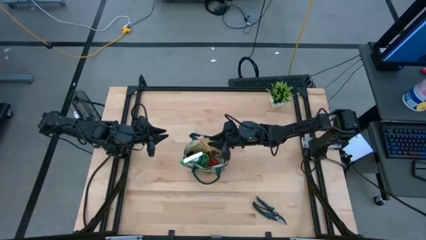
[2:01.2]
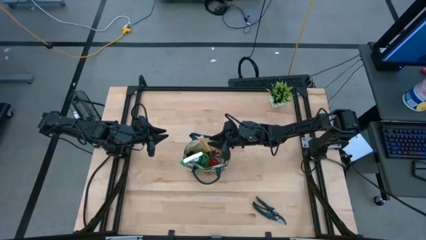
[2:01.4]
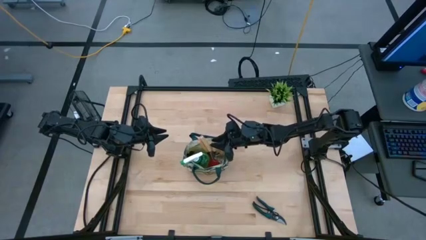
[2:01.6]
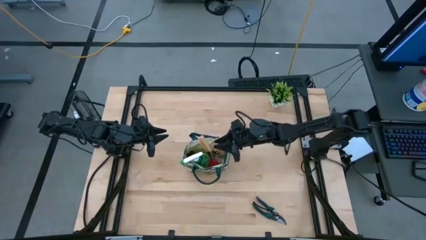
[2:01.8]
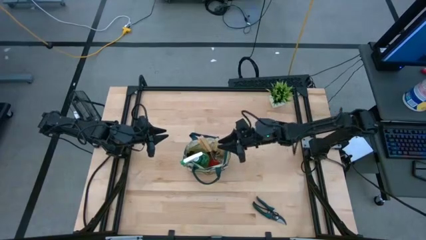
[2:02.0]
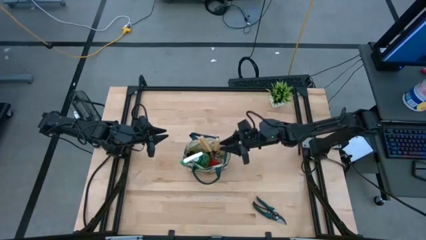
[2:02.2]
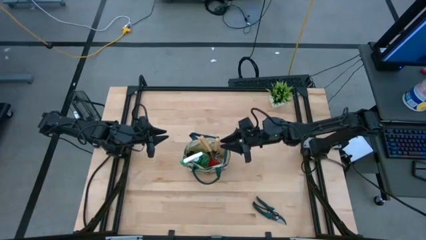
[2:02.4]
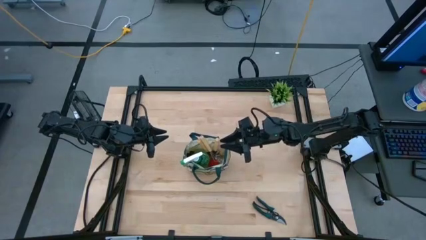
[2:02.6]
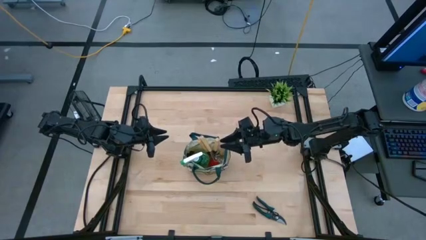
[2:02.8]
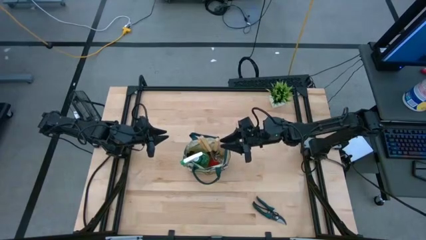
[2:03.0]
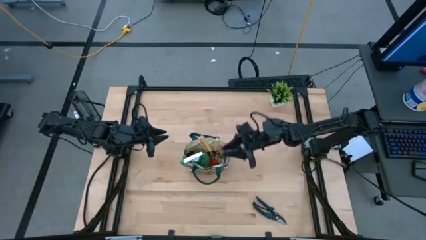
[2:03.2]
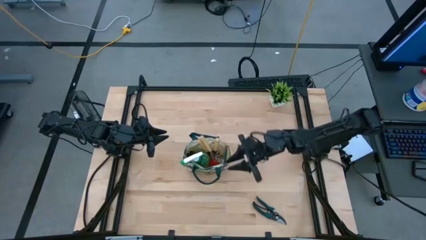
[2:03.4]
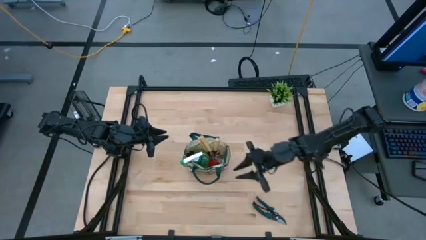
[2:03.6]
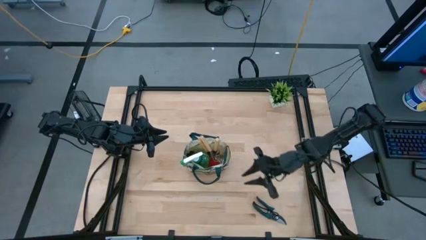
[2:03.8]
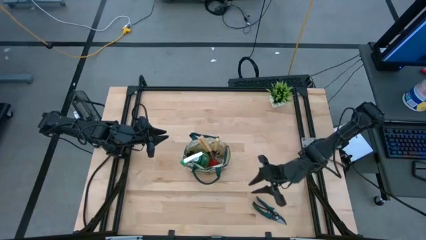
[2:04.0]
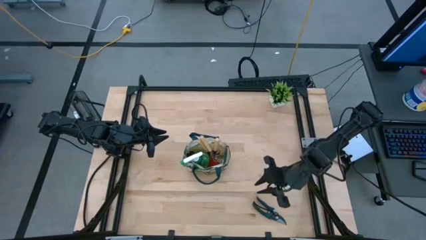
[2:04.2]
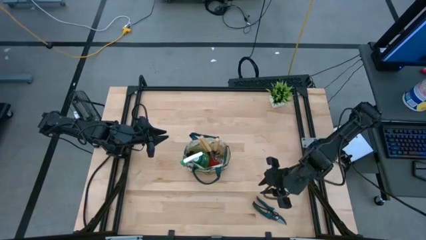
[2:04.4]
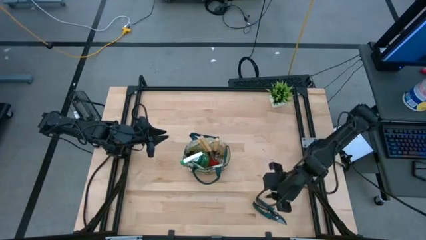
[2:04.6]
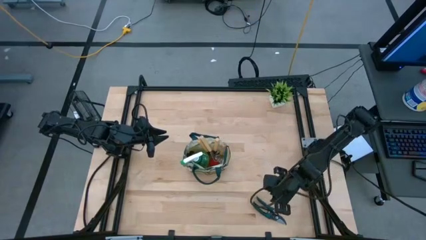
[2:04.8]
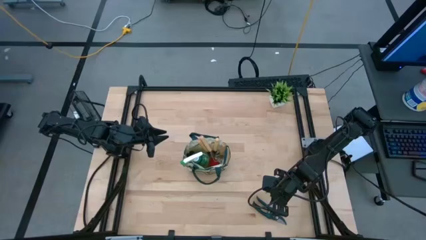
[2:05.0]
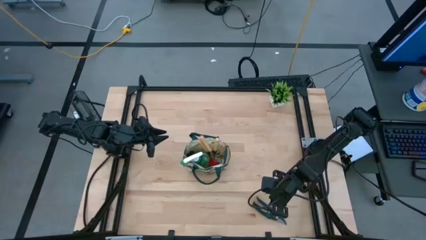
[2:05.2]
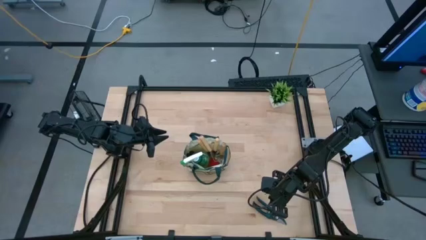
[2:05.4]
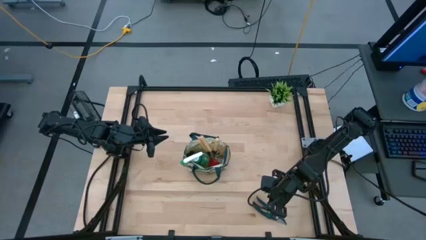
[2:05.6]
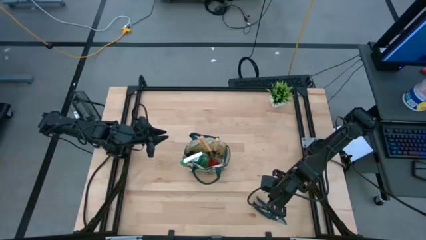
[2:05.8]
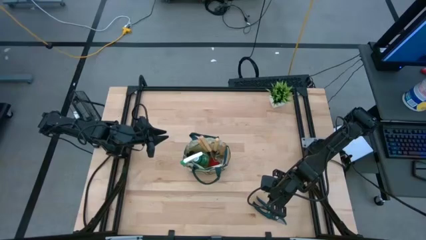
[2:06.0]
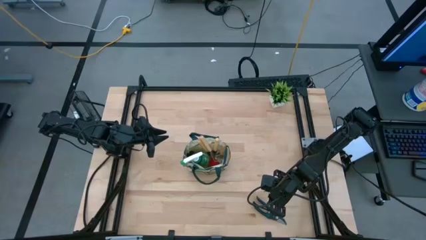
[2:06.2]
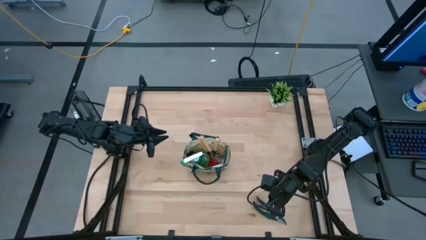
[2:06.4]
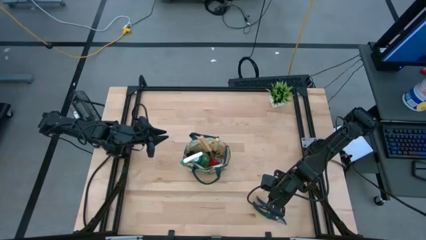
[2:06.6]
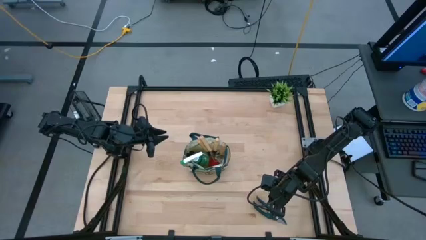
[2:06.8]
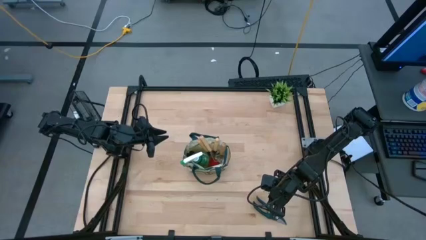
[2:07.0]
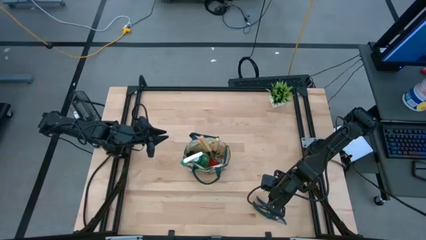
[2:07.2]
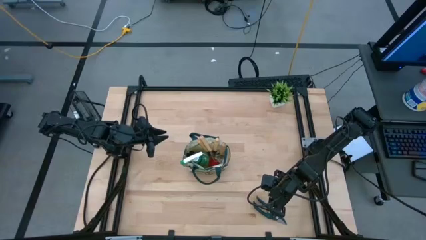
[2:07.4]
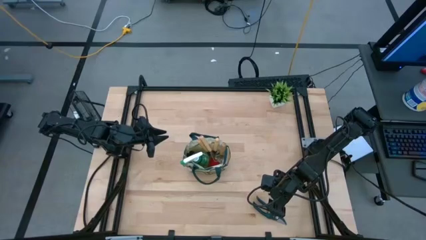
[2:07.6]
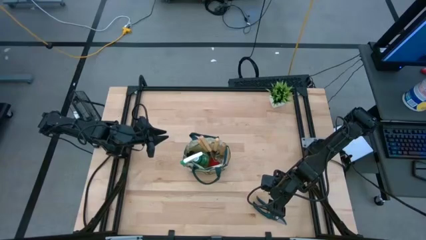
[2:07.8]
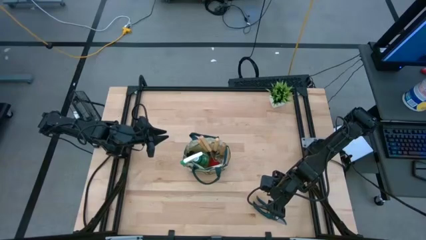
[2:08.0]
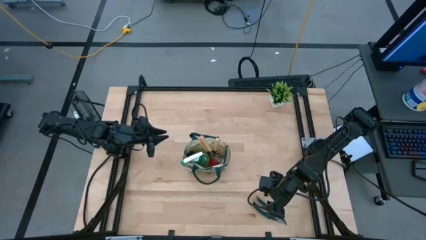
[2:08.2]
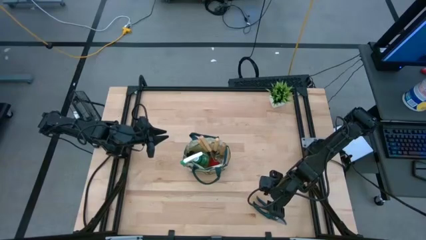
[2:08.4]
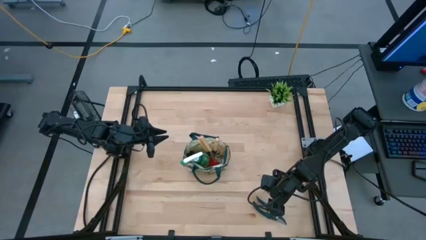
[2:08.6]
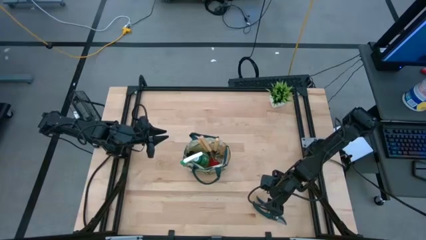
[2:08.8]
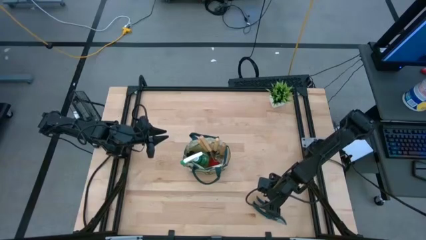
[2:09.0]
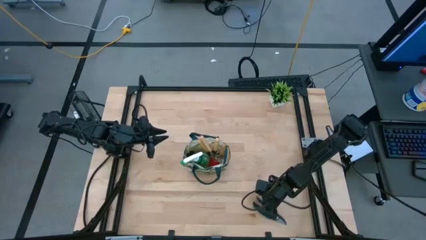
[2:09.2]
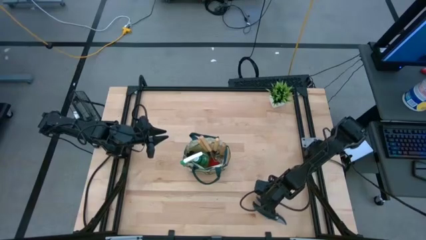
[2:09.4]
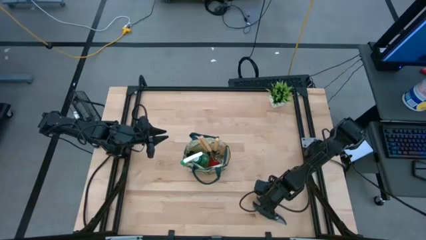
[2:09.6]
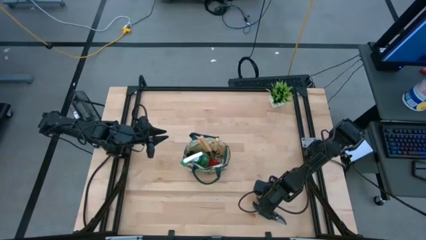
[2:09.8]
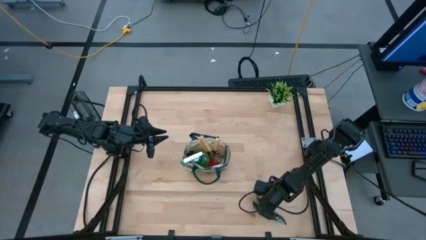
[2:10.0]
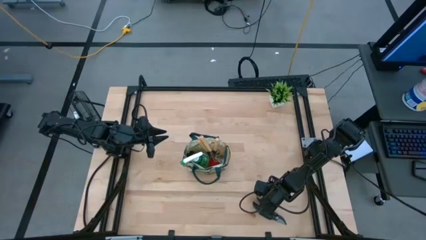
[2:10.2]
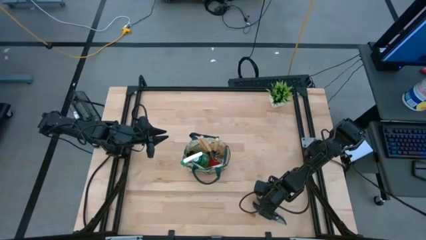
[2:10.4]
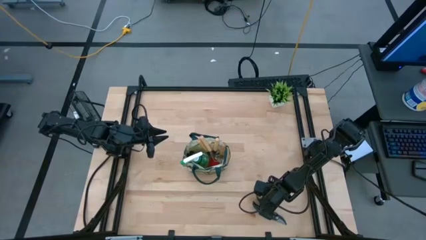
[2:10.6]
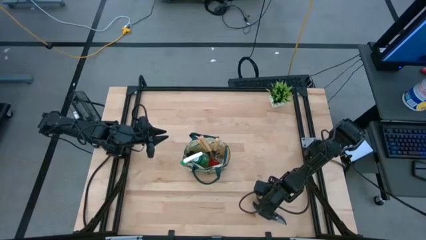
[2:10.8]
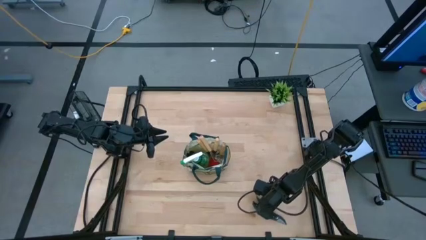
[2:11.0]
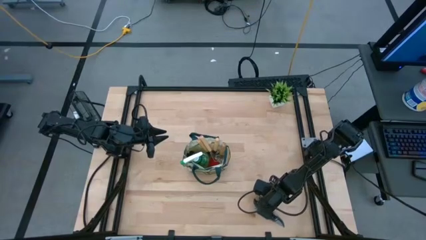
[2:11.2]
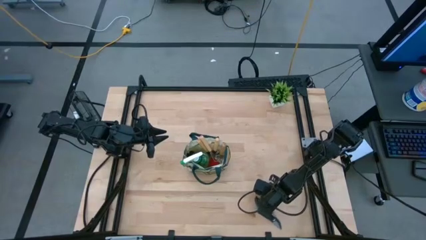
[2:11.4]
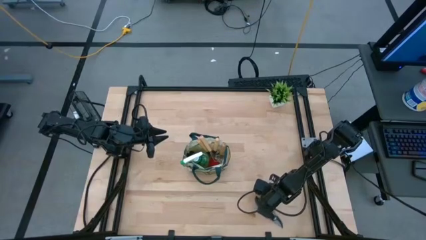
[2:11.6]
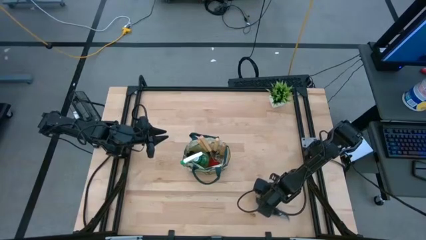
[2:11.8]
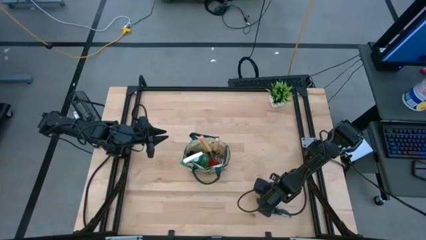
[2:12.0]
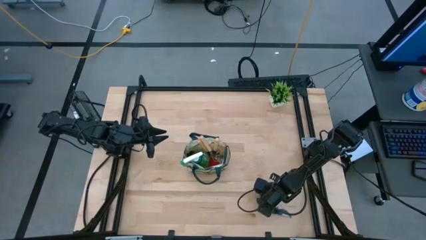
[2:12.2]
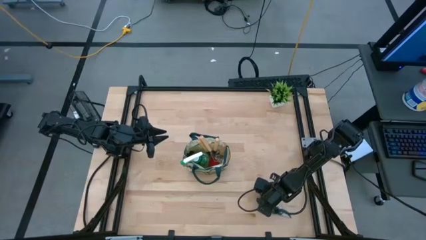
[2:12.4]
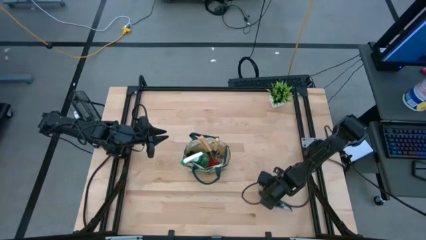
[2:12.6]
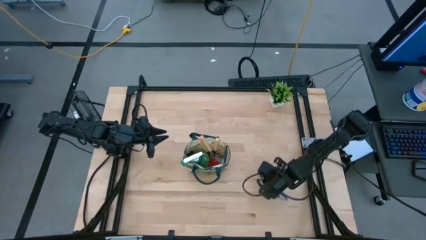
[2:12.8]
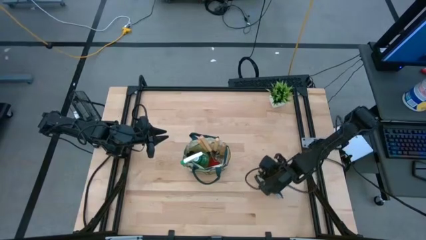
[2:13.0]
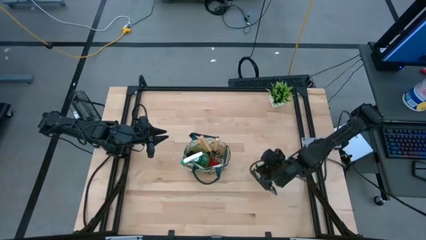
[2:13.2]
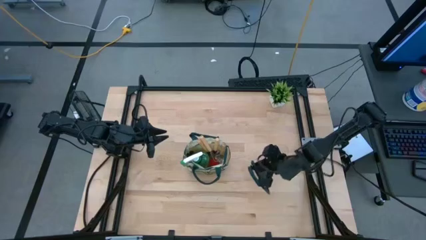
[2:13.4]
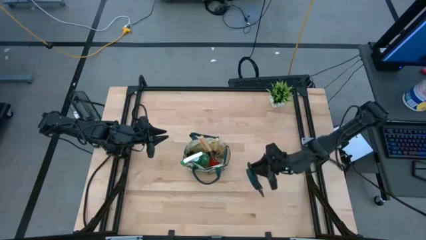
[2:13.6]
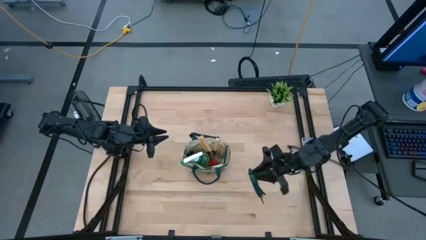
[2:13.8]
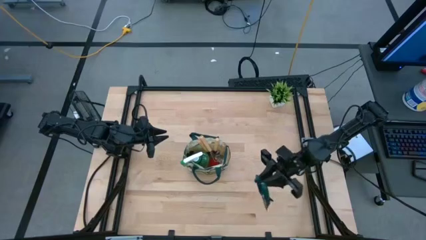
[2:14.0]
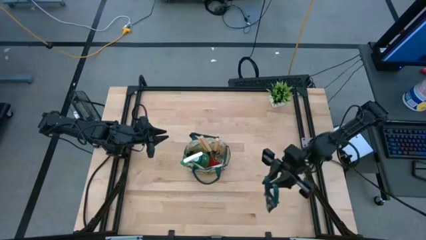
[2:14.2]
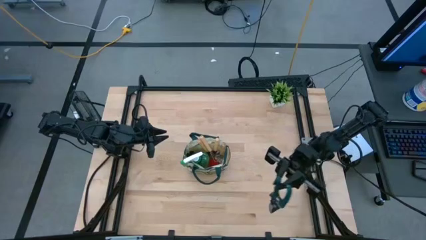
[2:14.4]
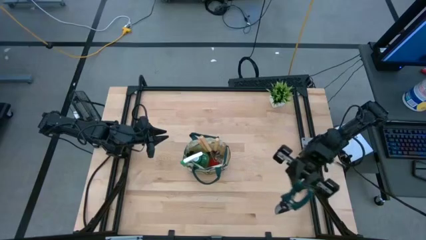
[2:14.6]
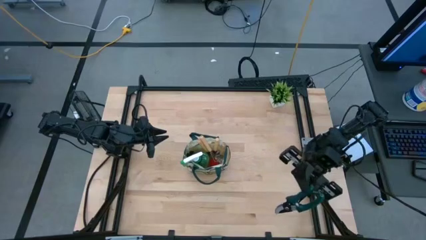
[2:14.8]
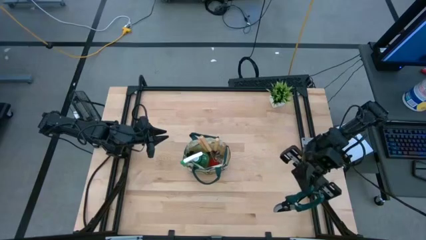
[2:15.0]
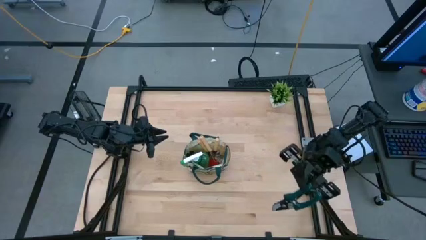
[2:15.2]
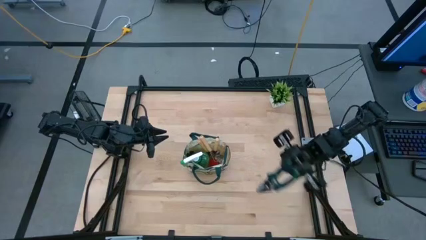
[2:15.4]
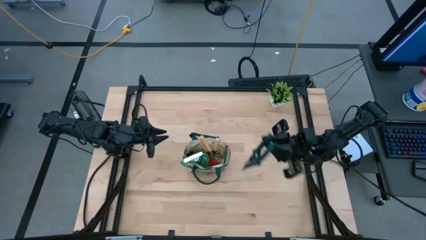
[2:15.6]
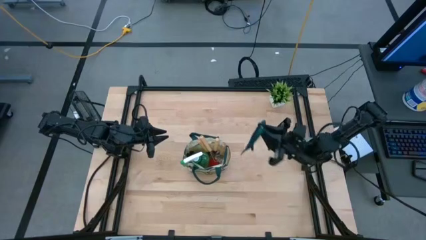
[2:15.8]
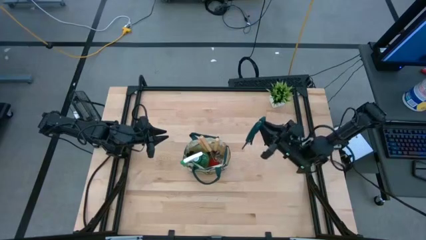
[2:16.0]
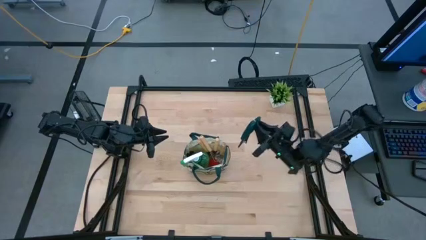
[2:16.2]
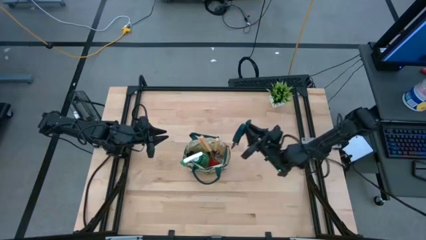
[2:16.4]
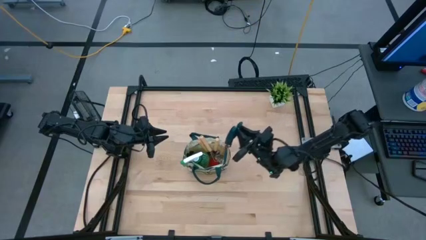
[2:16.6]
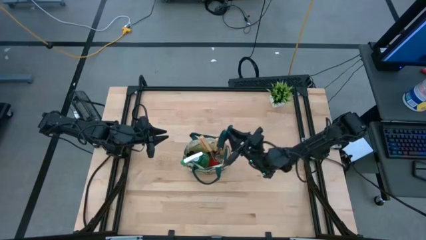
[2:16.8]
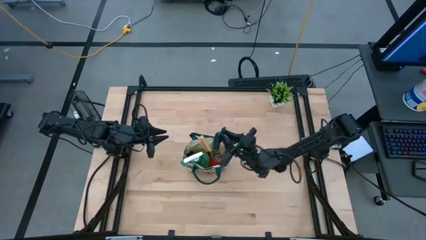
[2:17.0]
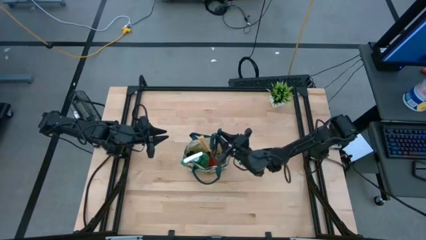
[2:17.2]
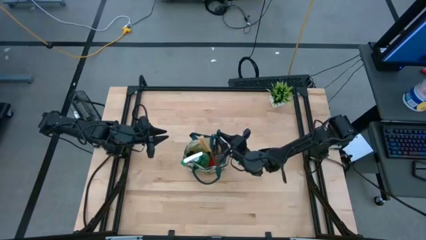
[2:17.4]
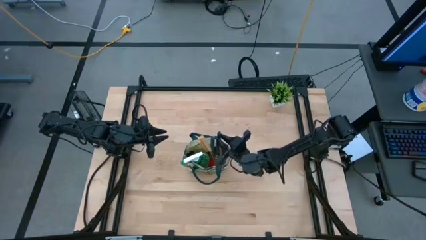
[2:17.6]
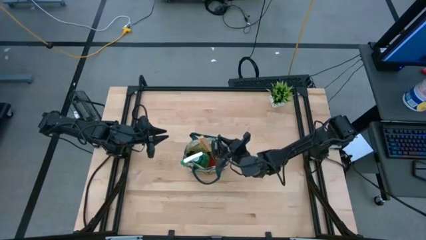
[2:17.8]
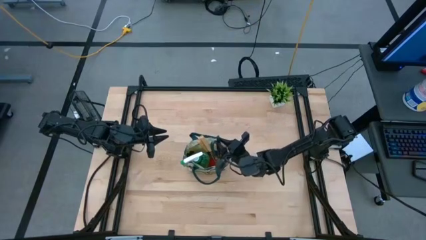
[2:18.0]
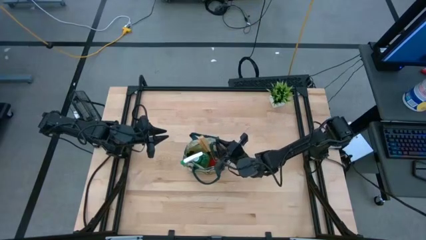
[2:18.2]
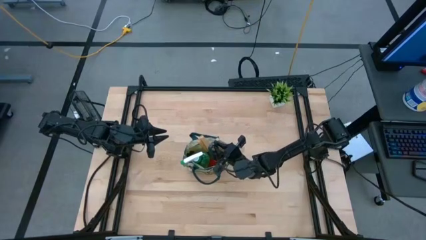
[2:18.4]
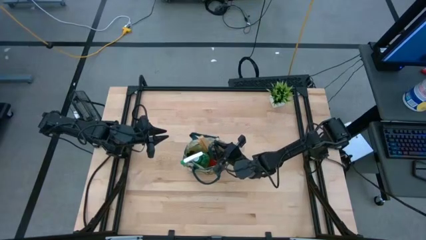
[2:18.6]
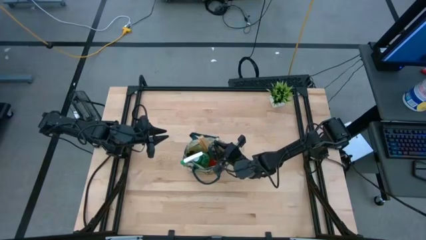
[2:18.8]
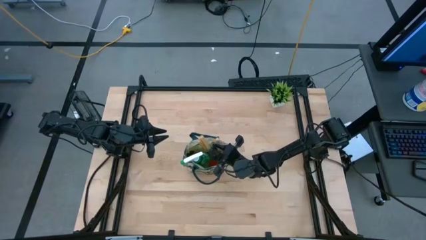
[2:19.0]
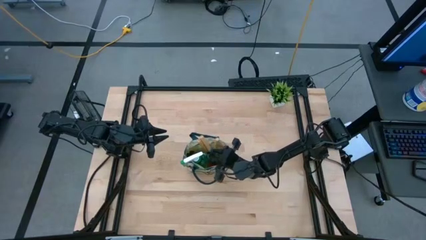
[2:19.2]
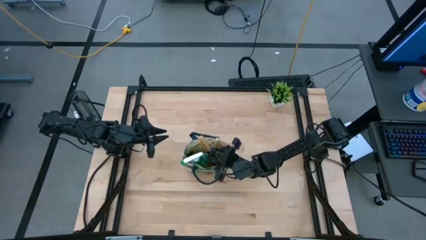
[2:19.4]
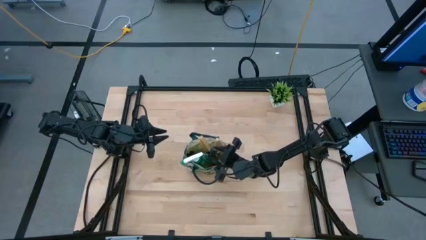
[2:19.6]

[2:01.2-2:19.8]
Task: Pick & Place Garden tools in Gardening bag
Put the green shear scissors into the white gardening bag
